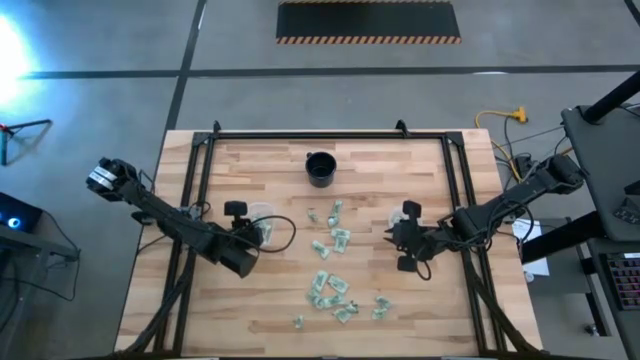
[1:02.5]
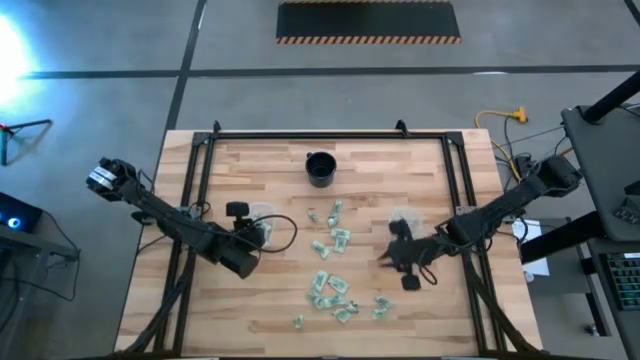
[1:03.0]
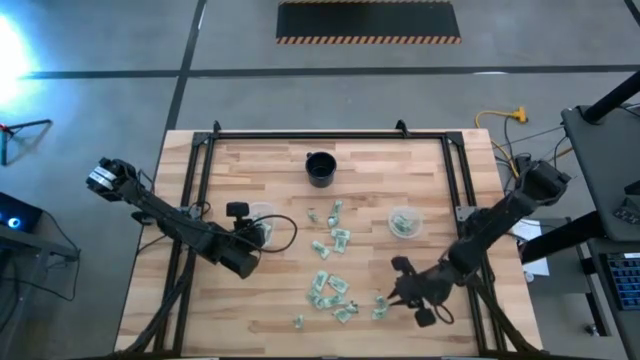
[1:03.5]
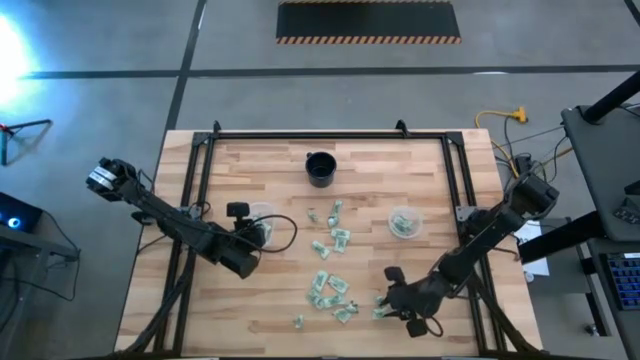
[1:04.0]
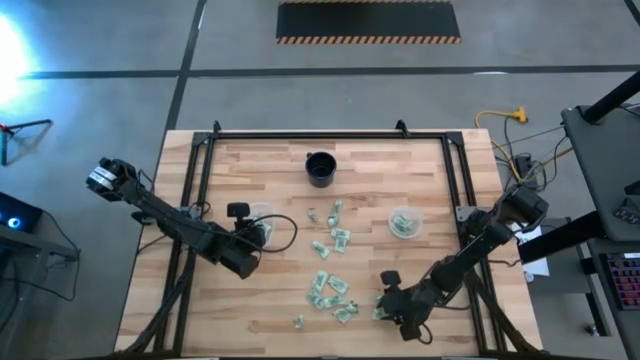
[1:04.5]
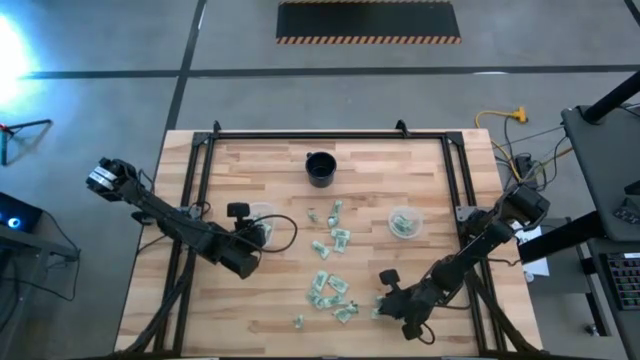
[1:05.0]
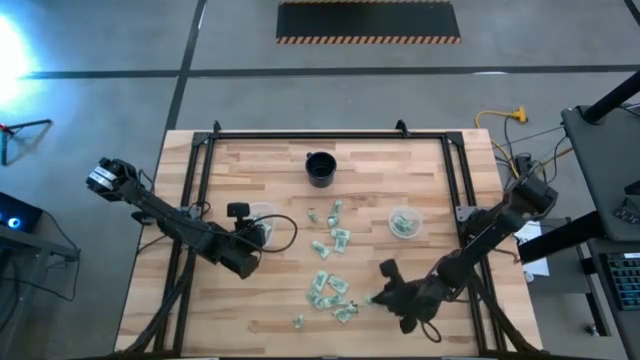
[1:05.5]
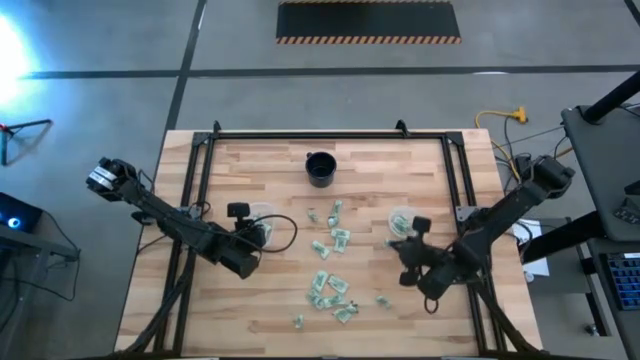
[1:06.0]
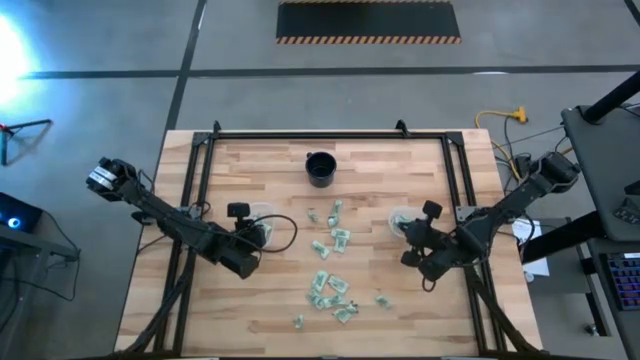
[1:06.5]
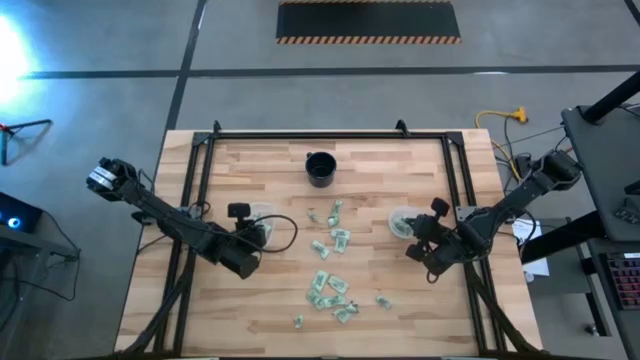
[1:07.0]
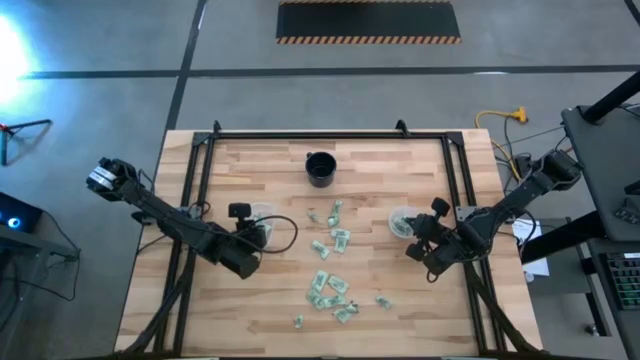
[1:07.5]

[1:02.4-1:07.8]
Task: Pick and place Stevia / Truvia into bins
Put the light green stevia packet into the circular container

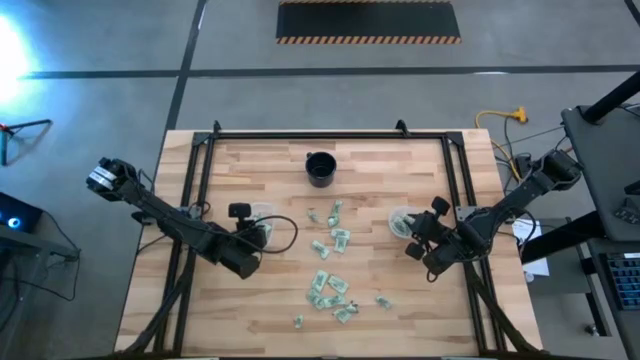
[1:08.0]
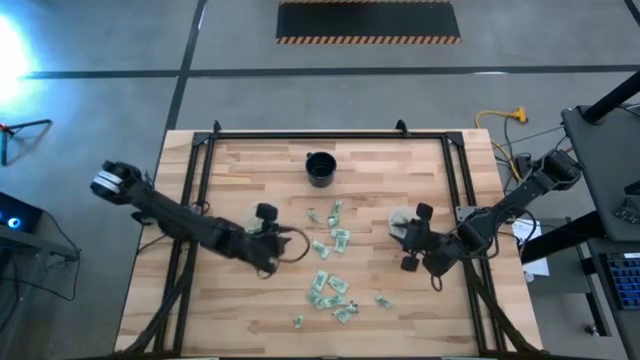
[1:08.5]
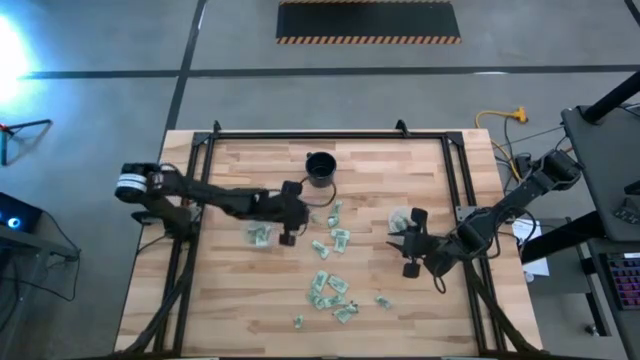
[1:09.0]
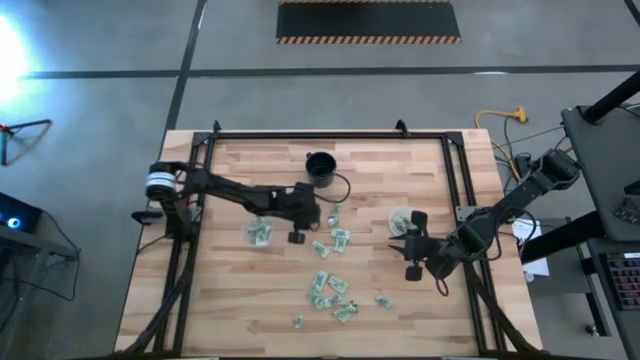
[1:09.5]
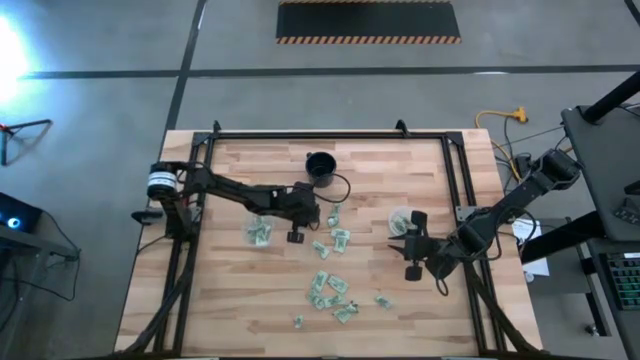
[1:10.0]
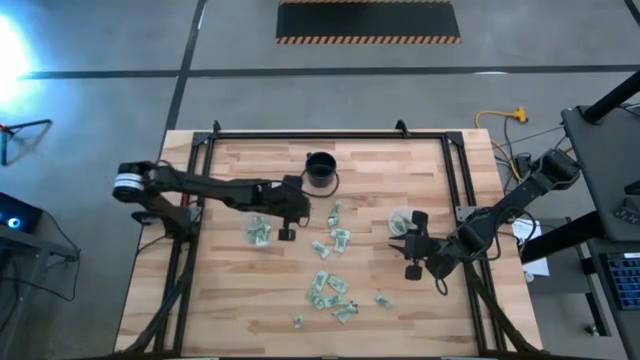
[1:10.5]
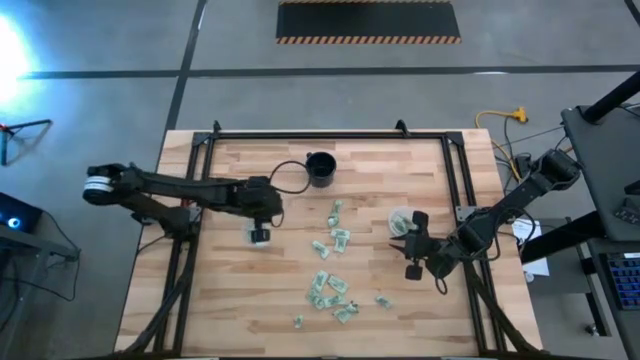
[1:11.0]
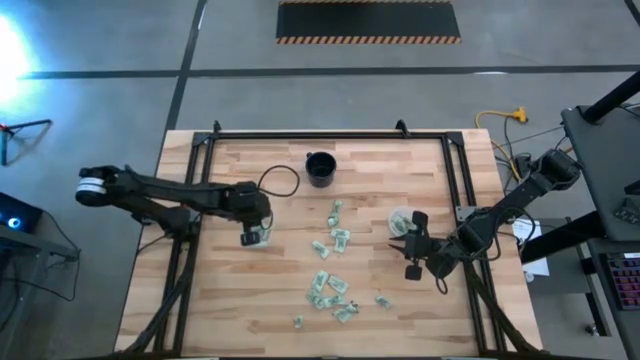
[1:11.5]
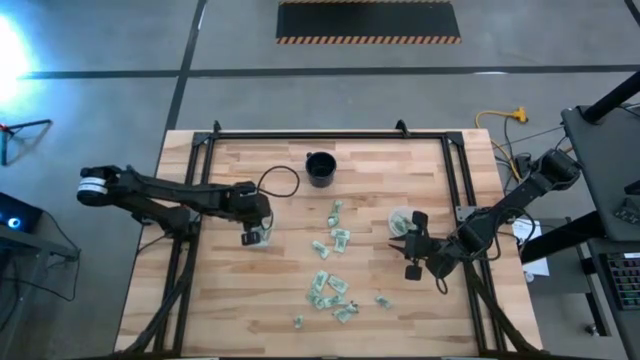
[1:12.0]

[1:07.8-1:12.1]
Put the light green stevia packet into the rectangular container

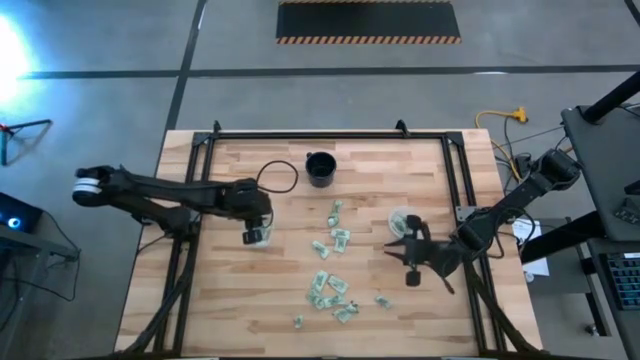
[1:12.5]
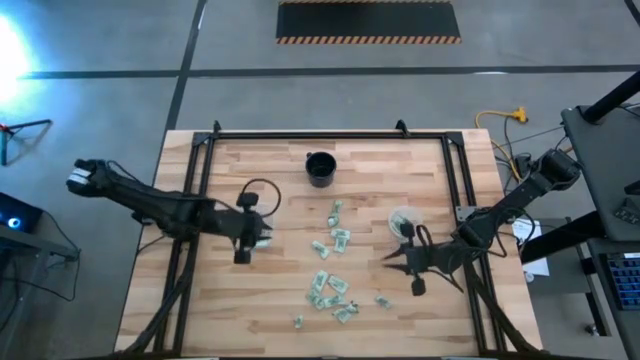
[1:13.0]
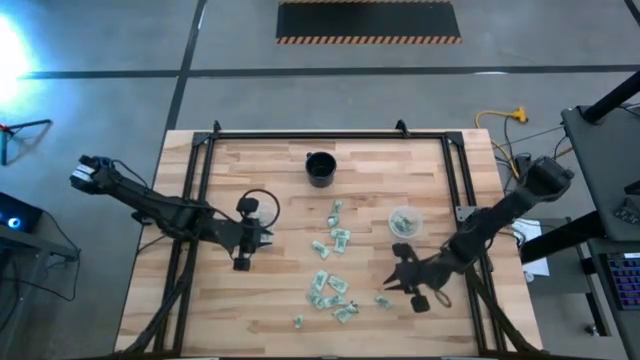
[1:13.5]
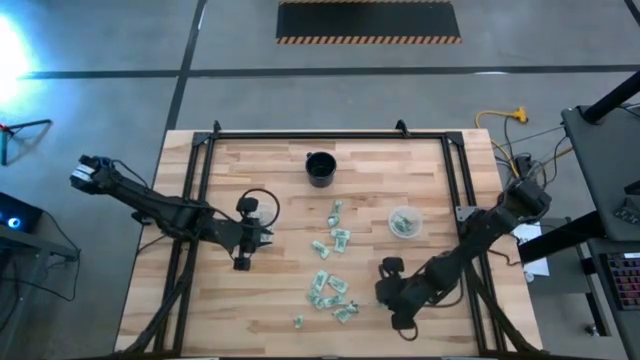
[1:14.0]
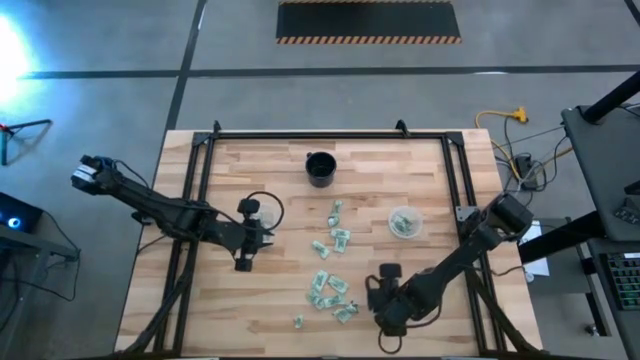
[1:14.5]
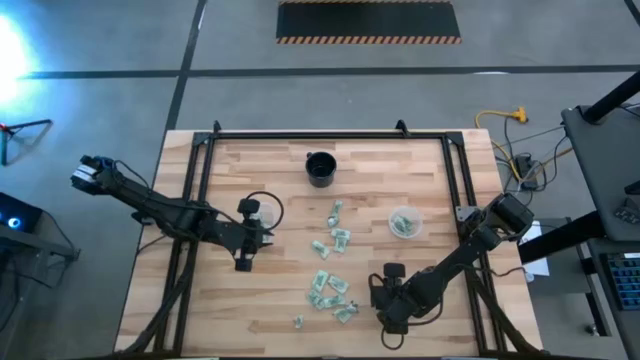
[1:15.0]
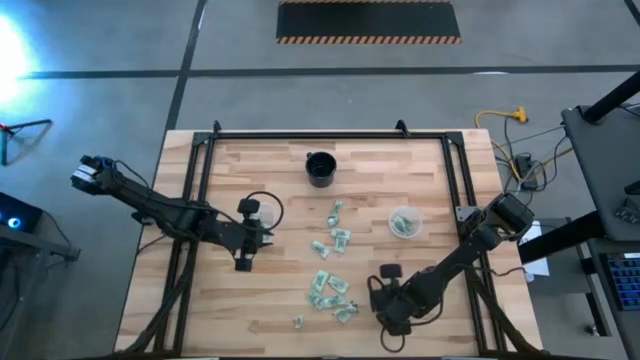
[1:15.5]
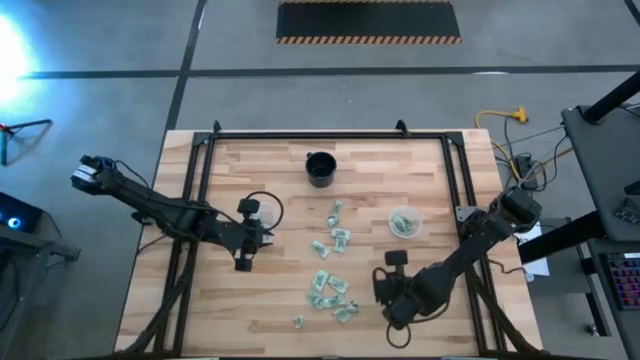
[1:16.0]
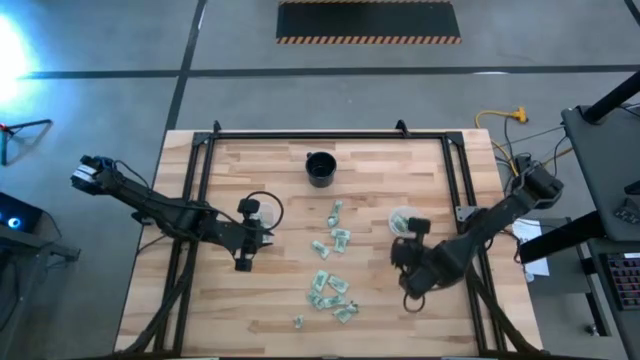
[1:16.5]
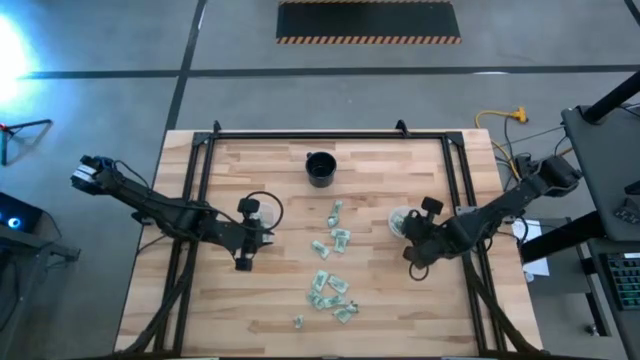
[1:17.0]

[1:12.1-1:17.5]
Put the light green stevia packet into the circular container

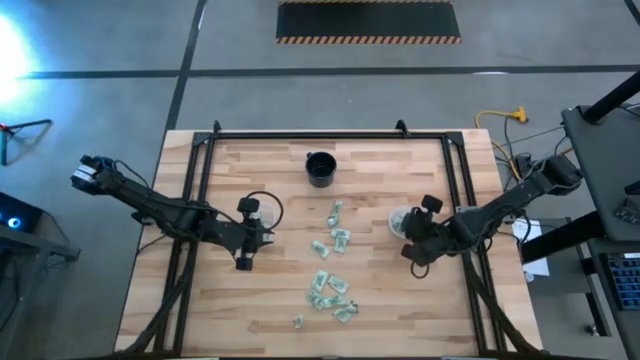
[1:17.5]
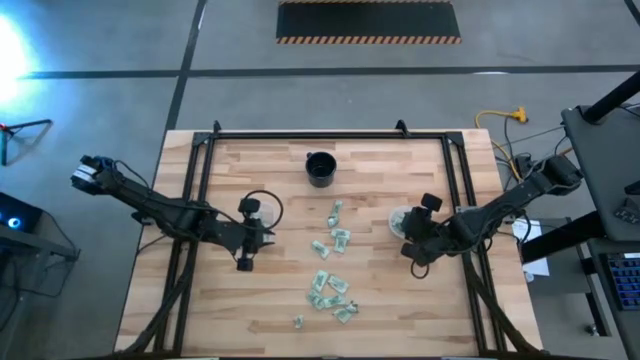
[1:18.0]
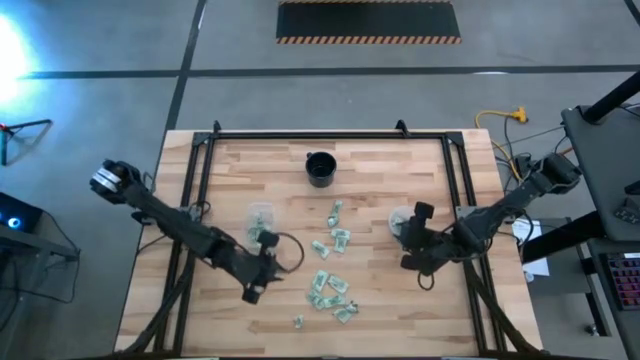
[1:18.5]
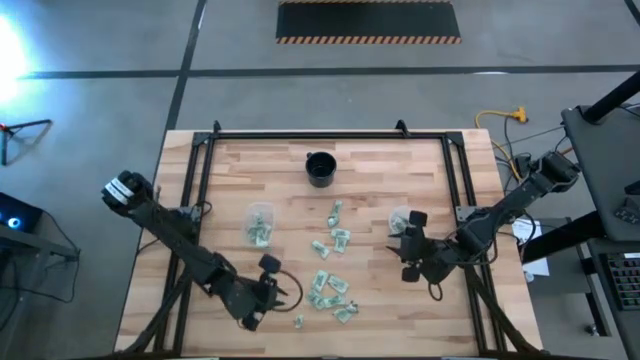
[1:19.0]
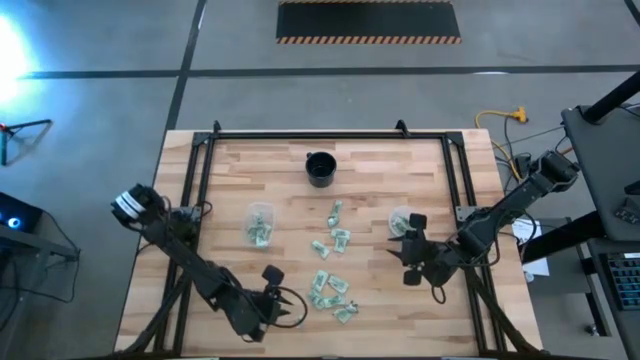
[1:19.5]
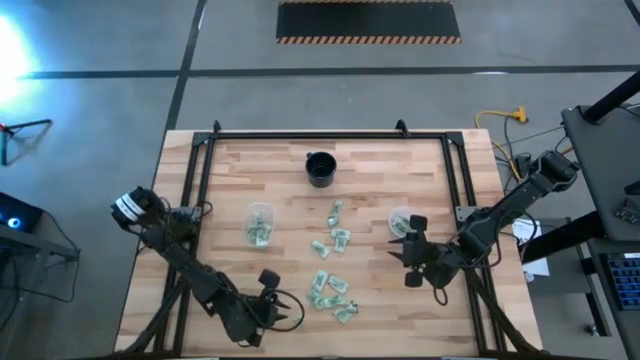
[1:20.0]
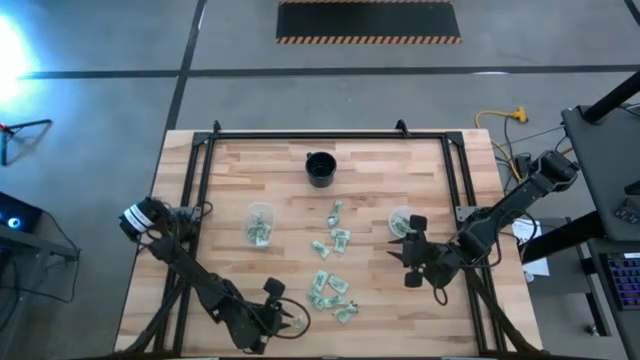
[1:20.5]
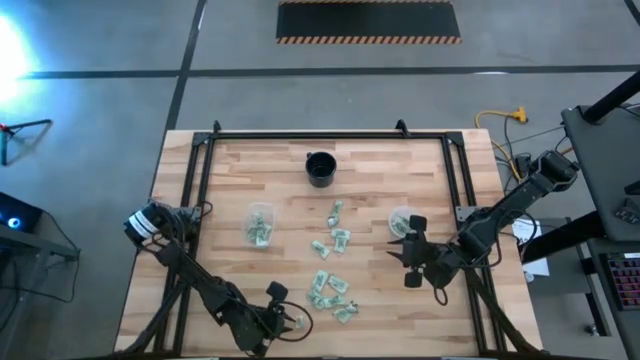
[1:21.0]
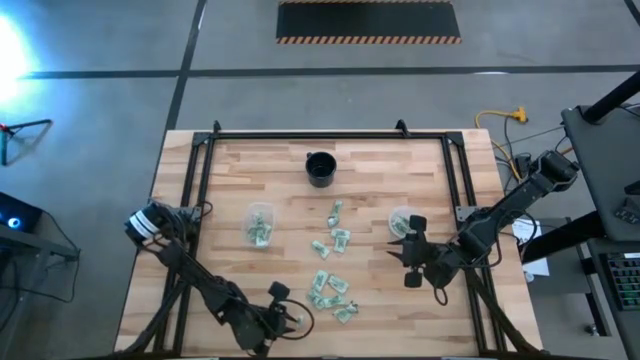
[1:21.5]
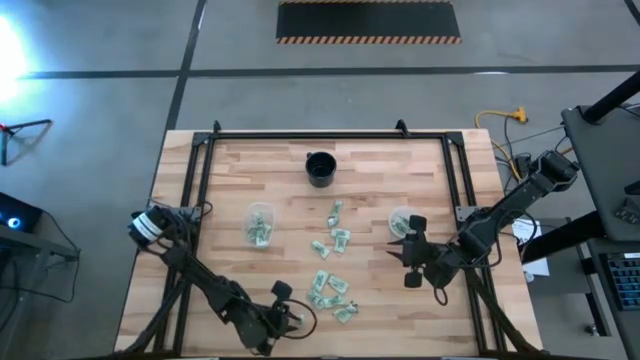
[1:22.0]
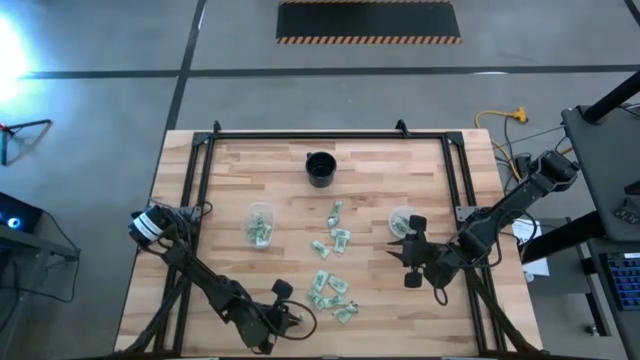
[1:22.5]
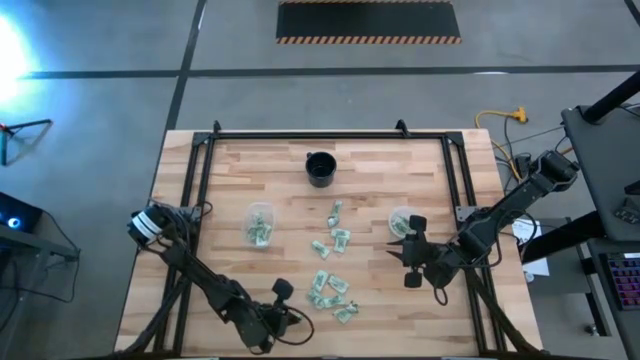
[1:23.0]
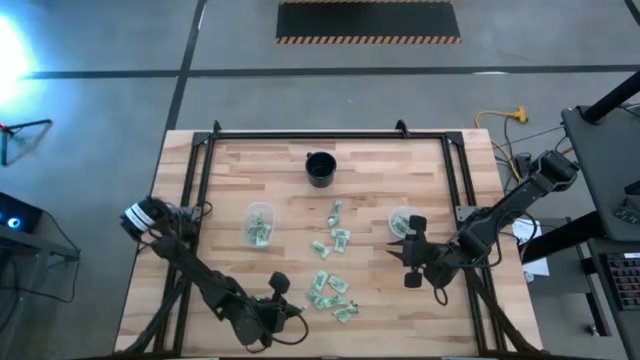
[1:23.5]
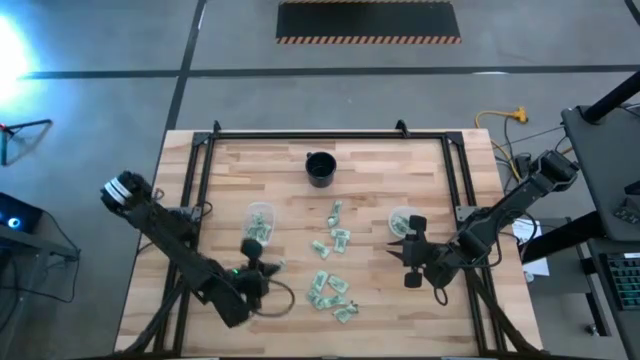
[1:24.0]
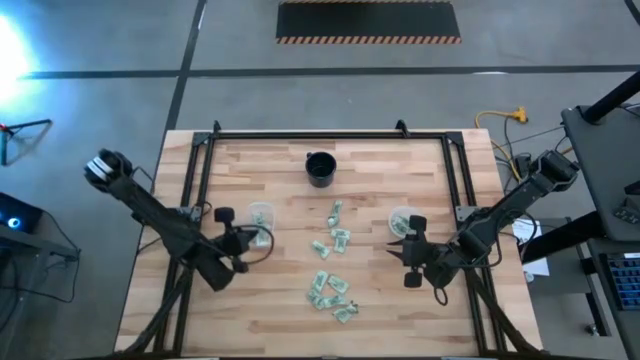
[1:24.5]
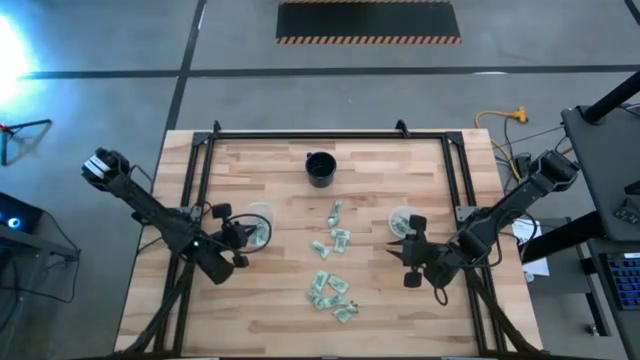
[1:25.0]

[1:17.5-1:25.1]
Put the light green stevia packet into the rectangular container
